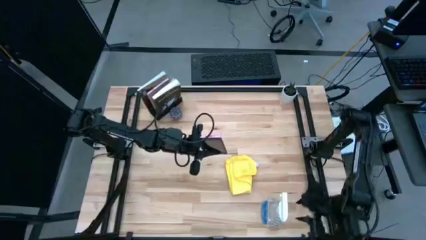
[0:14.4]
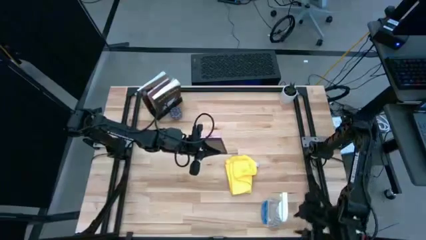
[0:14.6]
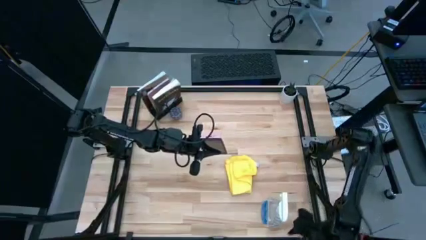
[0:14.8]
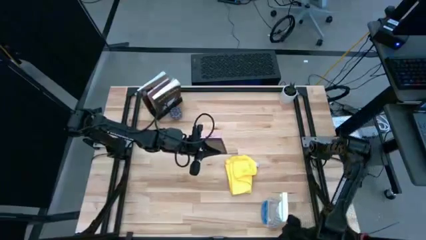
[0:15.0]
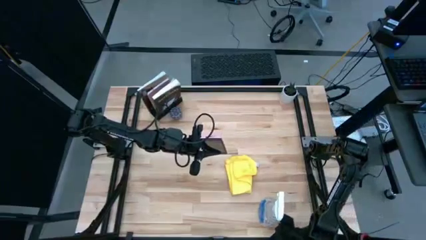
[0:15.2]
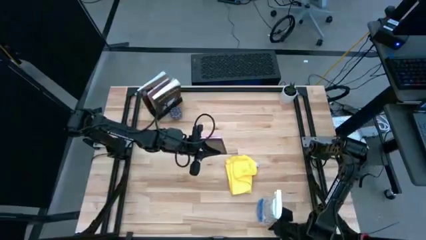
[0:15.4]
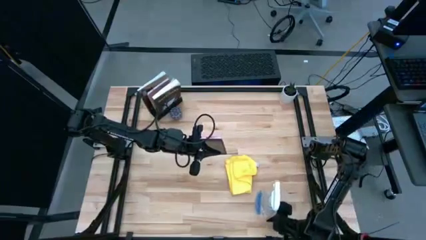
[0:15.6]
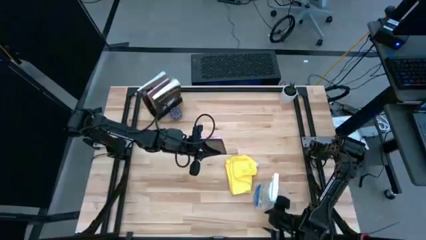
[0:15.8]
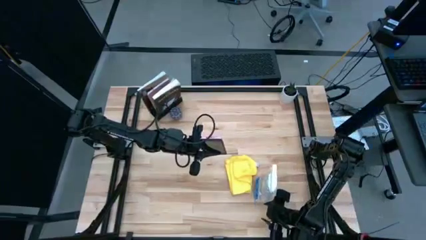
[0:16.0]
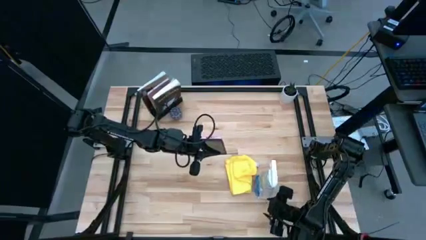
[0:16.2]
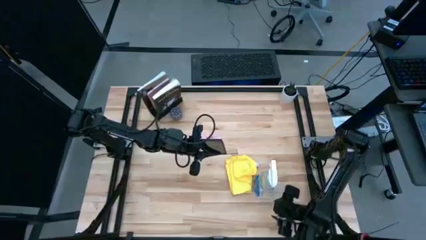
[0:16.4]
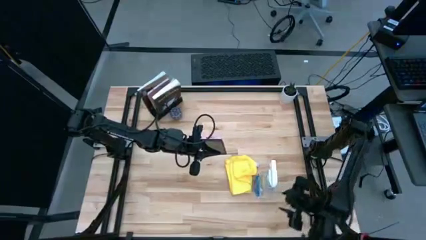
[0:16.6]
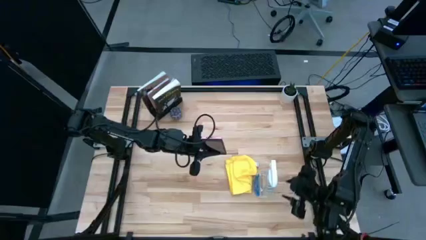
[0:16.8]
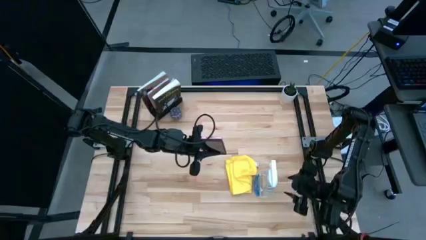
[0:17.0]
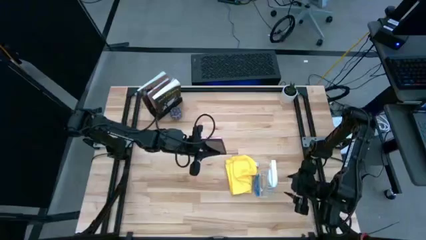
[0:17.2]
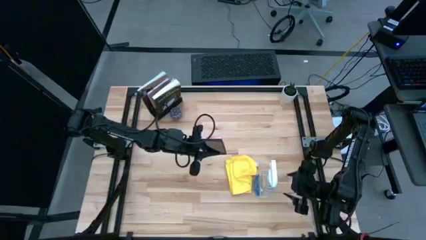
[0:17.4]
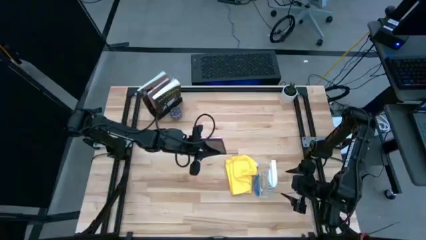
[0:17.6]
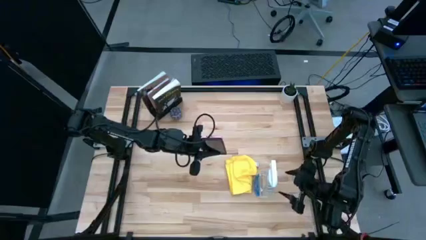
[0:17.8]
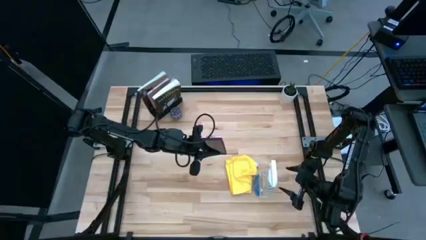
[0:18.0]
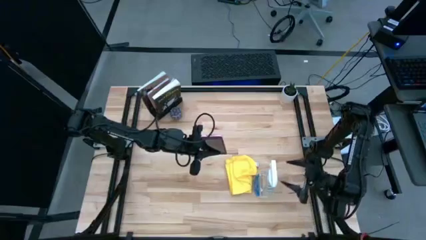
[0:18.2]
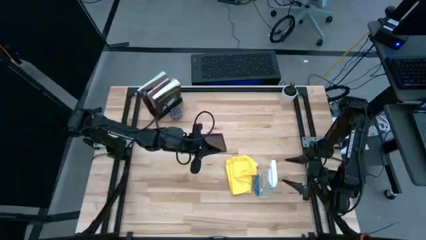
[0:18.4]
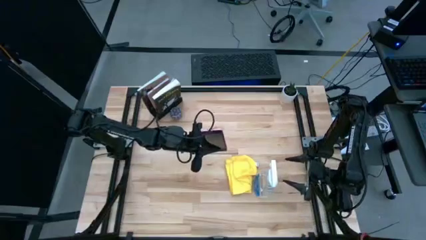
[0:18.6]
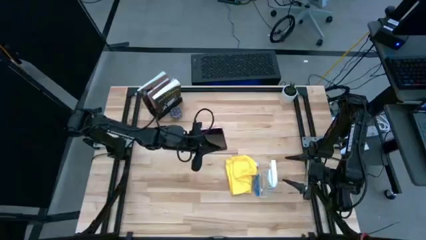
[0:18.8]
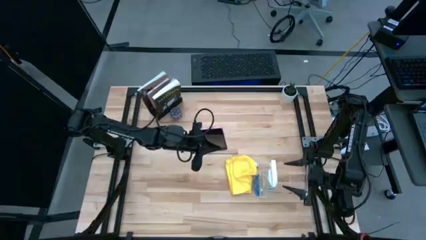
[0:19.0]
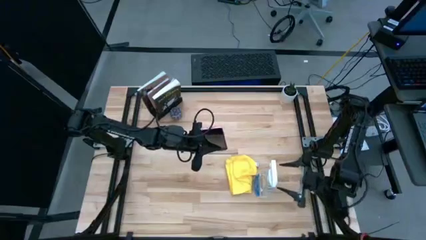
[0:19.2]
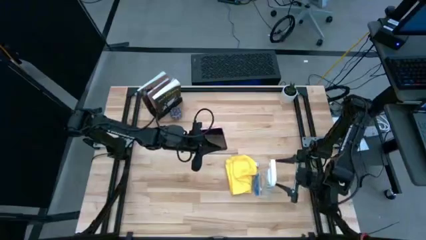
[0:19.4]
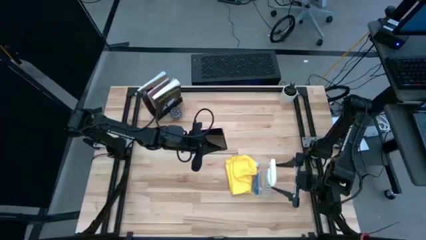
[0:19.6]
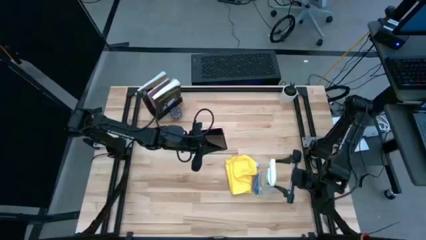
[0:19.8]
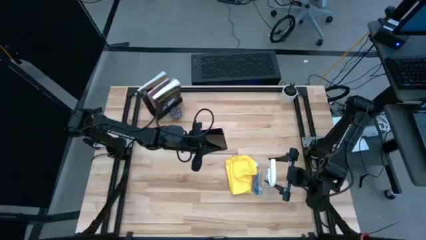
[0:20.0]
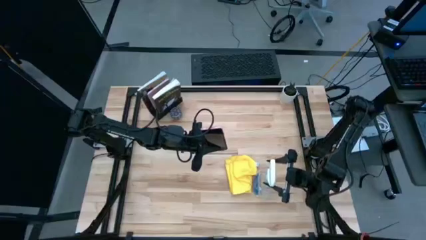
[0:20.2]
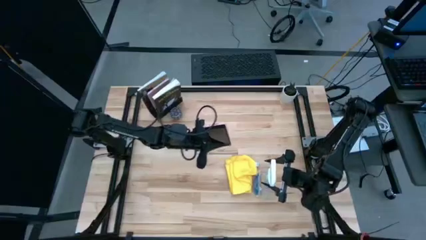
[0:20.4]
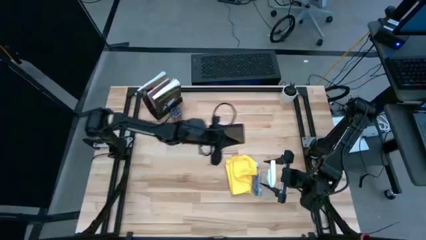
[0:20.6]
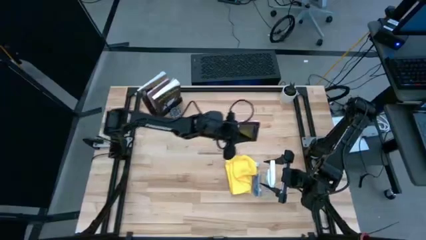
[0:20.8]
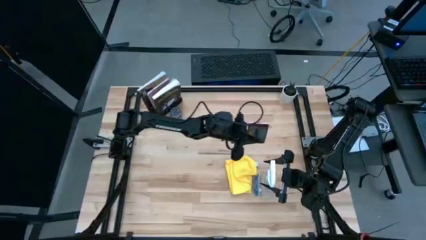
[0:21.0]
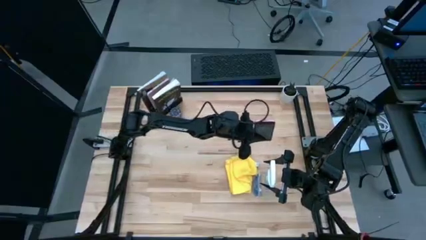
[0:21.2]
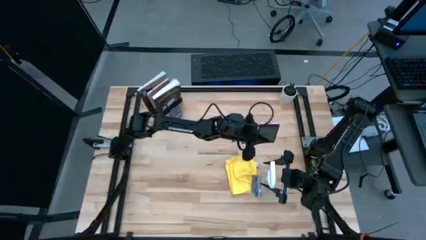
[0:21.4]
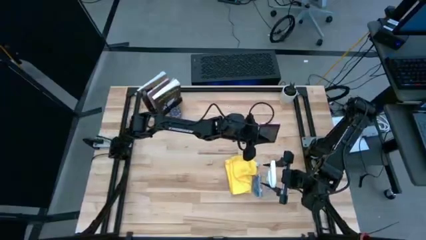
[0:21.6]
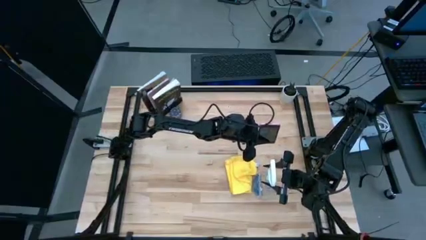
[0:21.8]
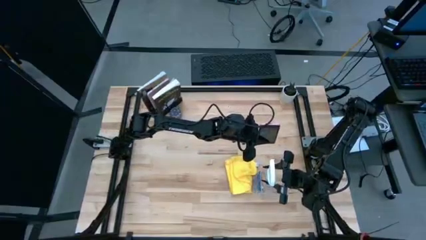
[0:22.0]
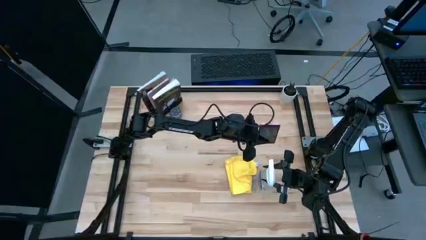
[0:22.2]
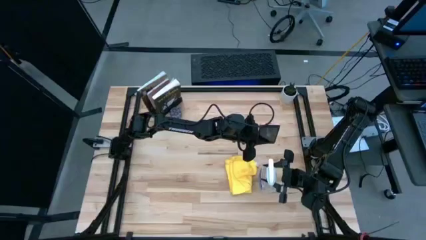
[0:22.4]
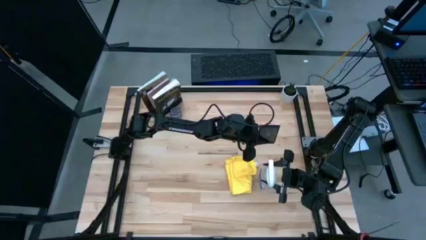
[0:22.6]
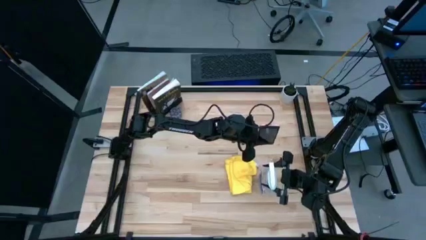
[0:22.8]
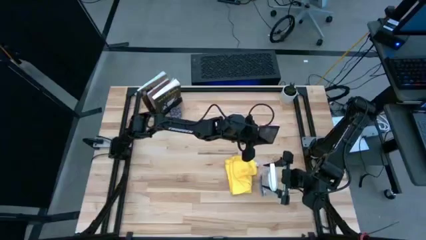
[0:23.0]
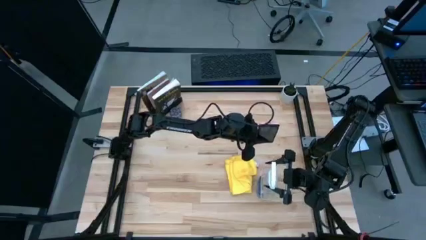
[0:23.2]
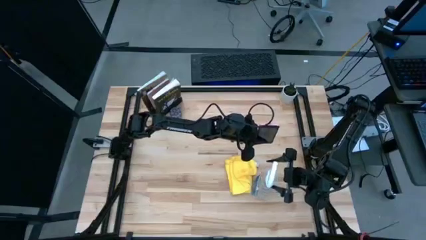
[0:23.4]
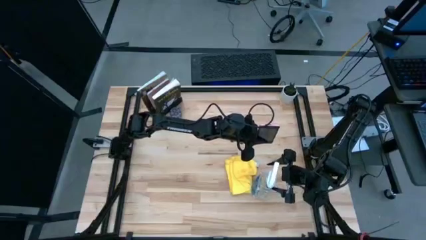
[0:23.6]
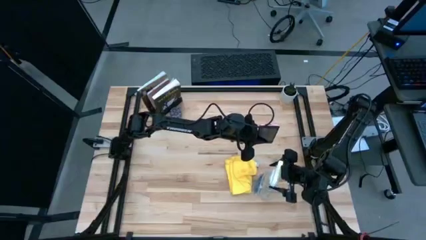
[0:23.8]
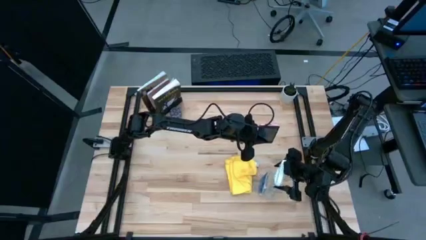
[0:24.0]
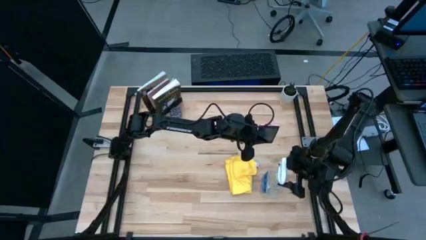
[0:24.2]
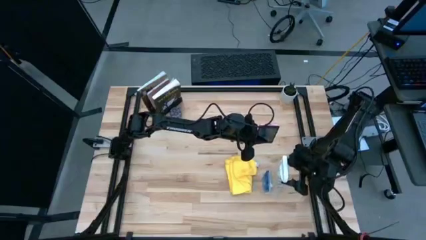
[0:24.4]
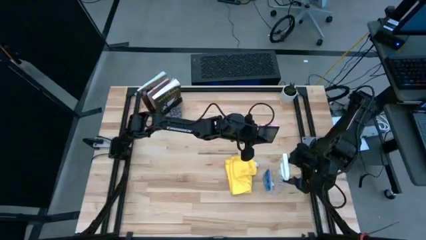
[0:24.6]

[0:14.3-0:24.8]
Task: Apply microfiber cloth
Spray the front of the pink cellphone using the spray bottle
